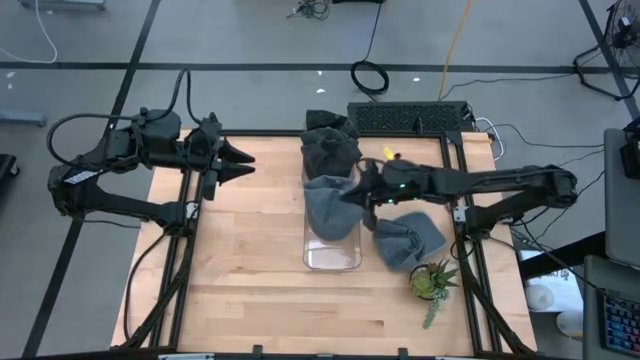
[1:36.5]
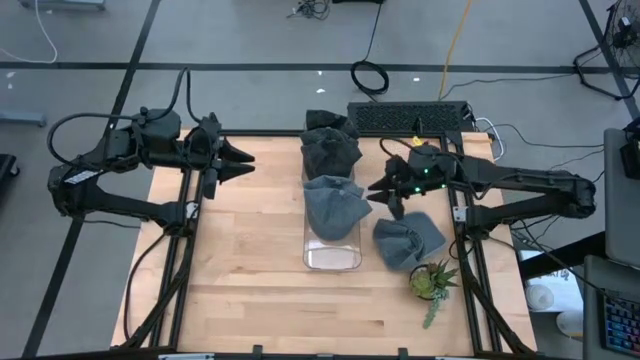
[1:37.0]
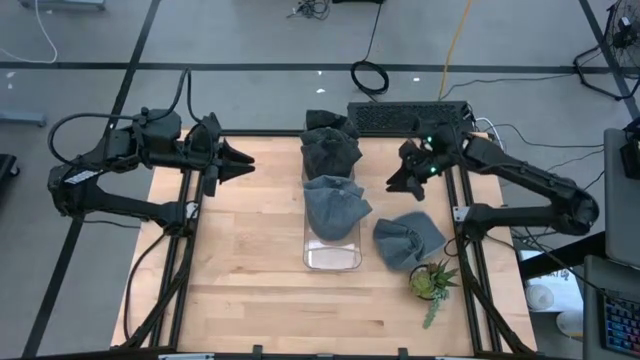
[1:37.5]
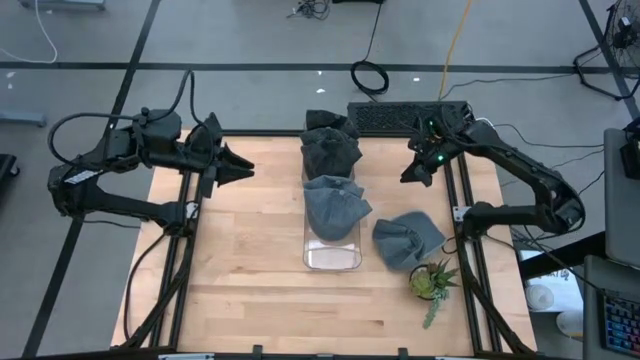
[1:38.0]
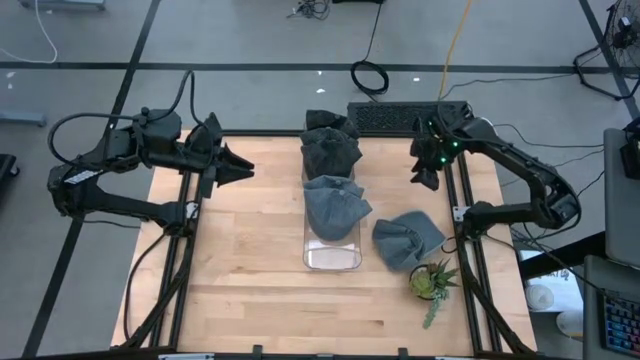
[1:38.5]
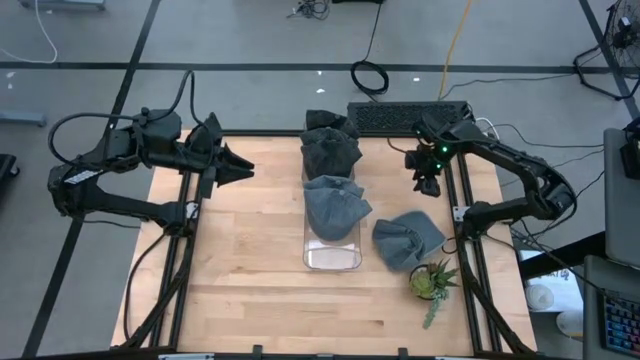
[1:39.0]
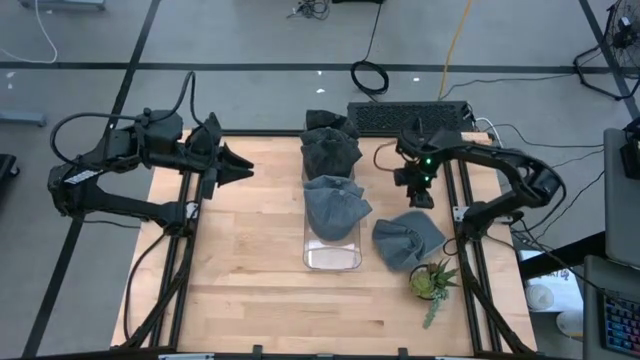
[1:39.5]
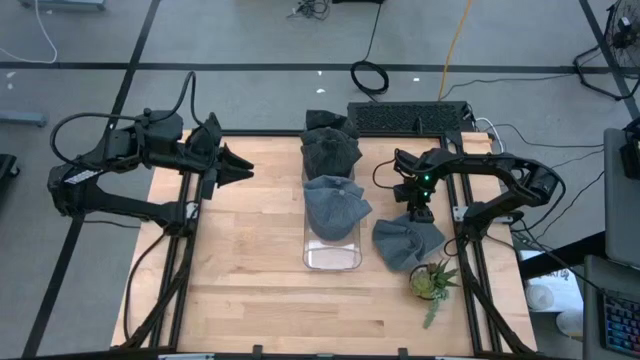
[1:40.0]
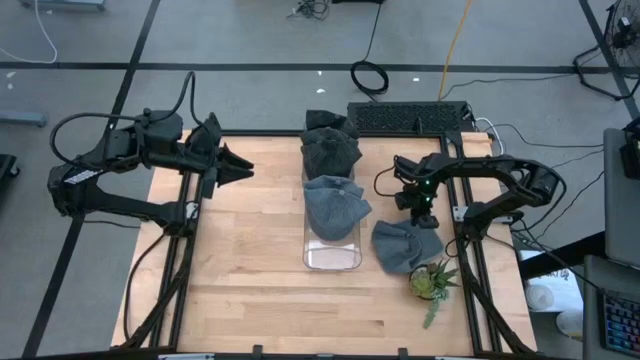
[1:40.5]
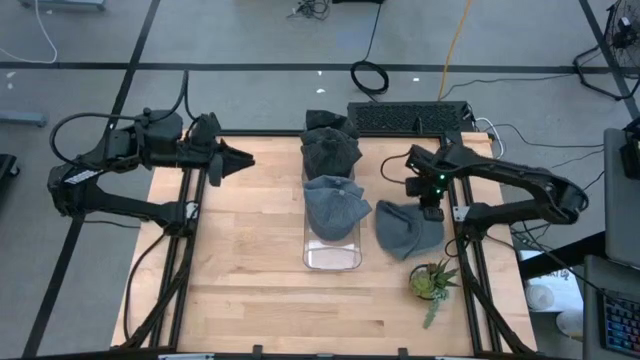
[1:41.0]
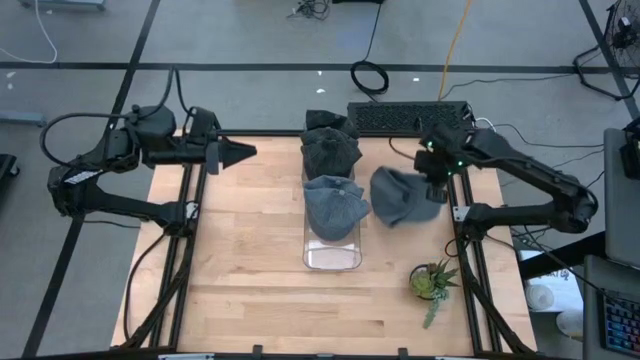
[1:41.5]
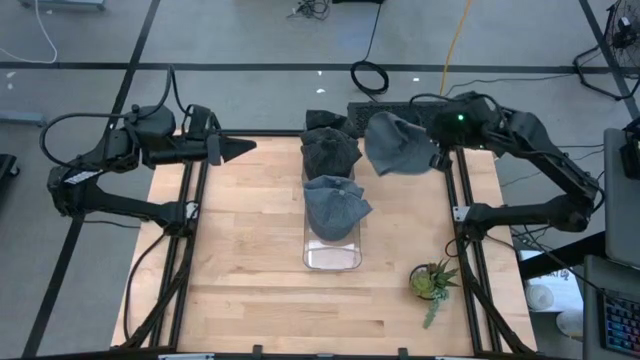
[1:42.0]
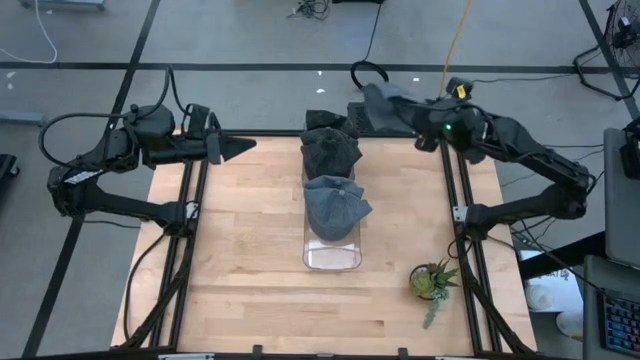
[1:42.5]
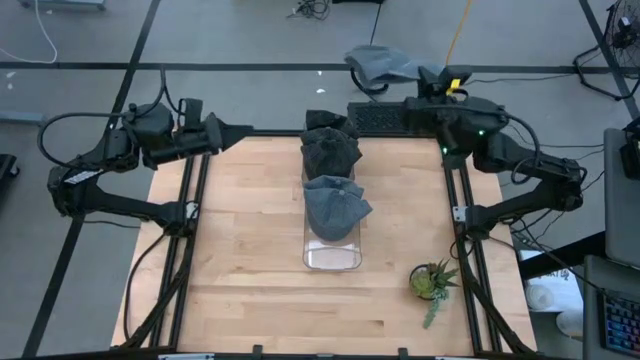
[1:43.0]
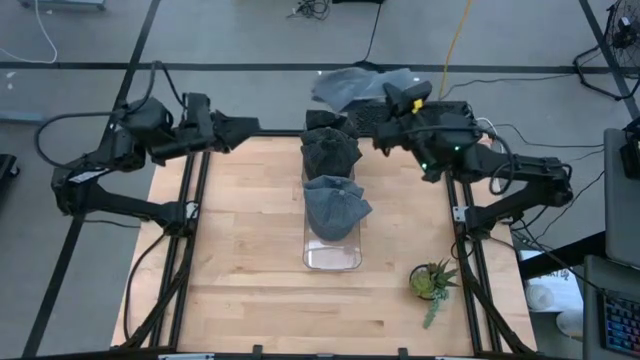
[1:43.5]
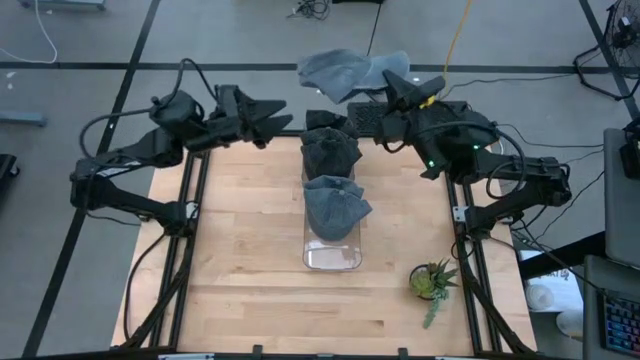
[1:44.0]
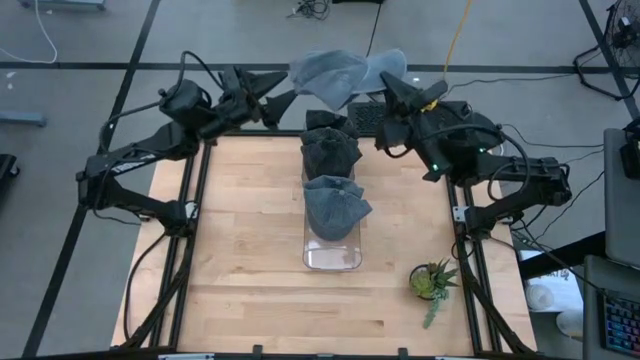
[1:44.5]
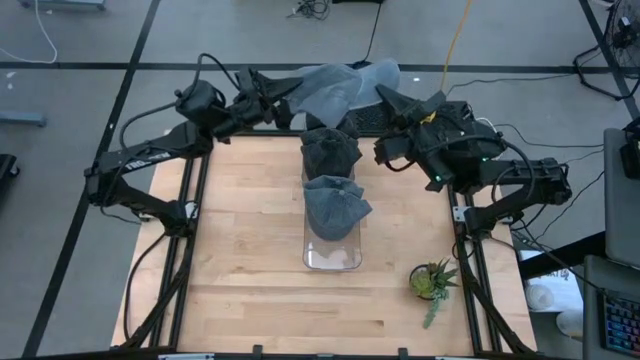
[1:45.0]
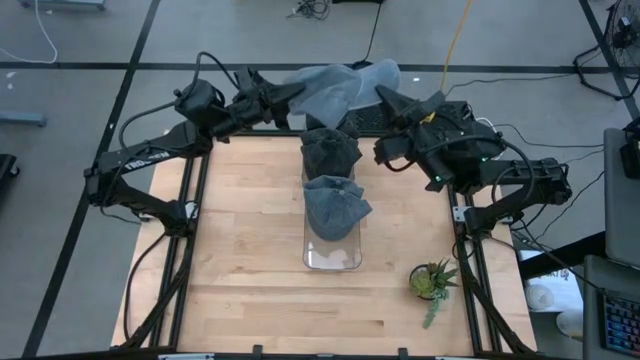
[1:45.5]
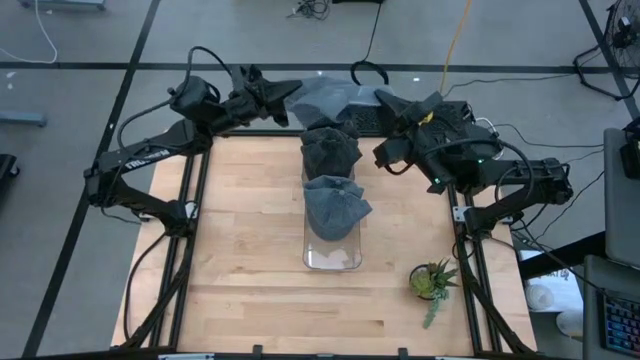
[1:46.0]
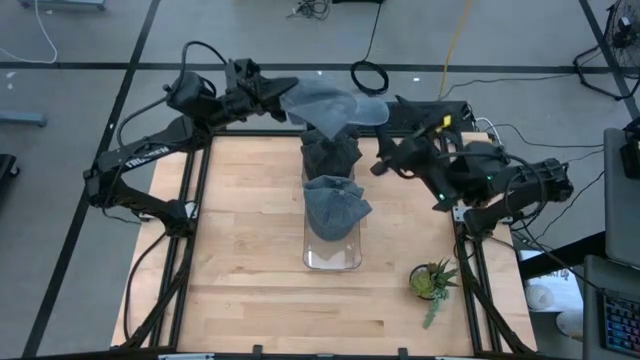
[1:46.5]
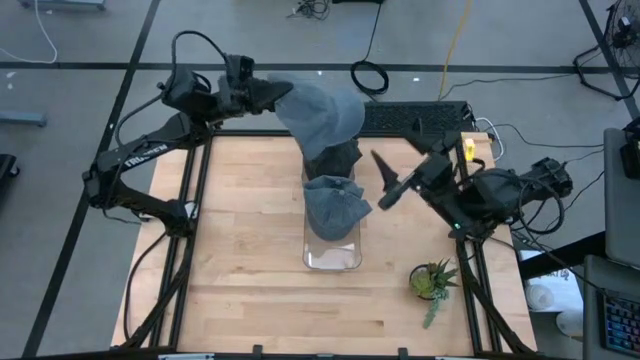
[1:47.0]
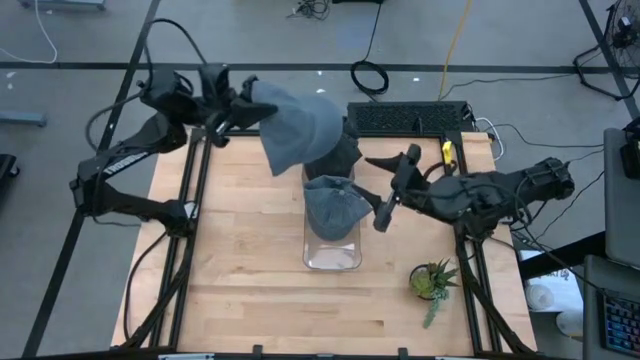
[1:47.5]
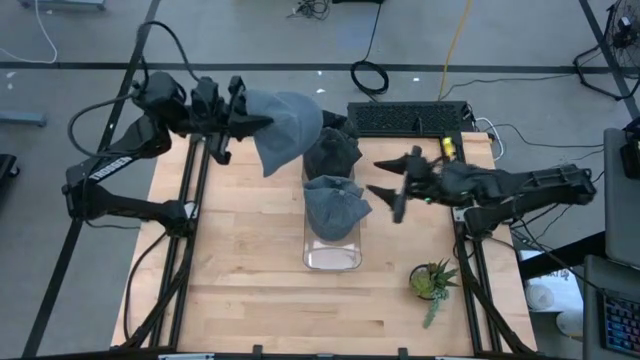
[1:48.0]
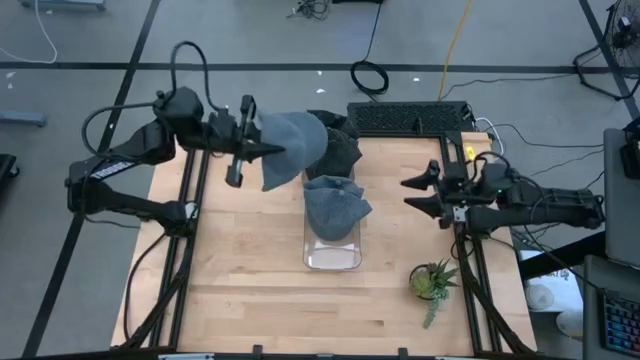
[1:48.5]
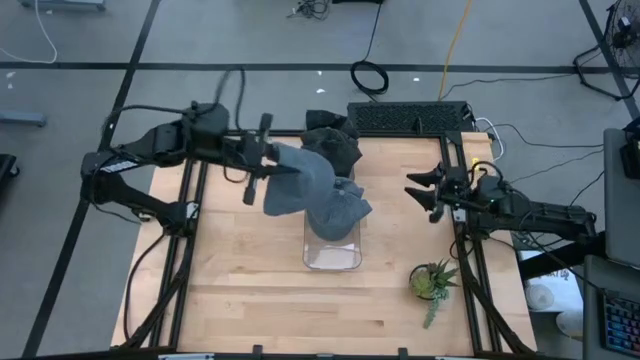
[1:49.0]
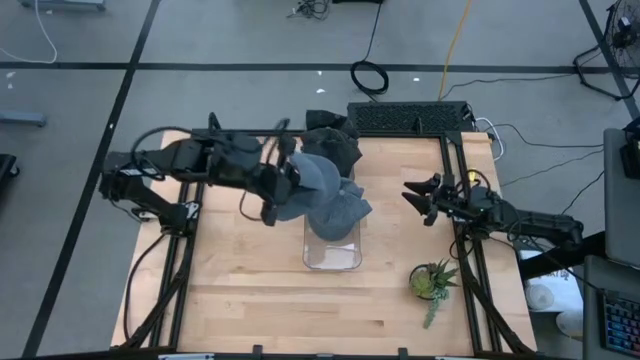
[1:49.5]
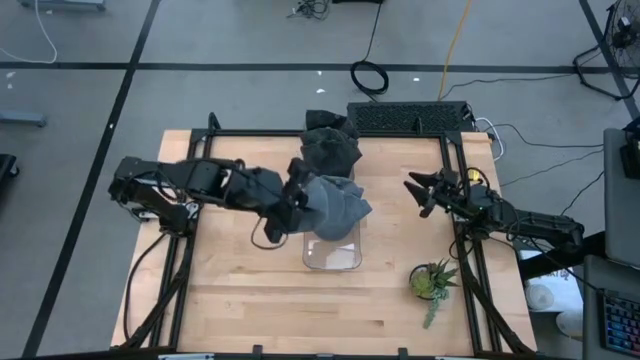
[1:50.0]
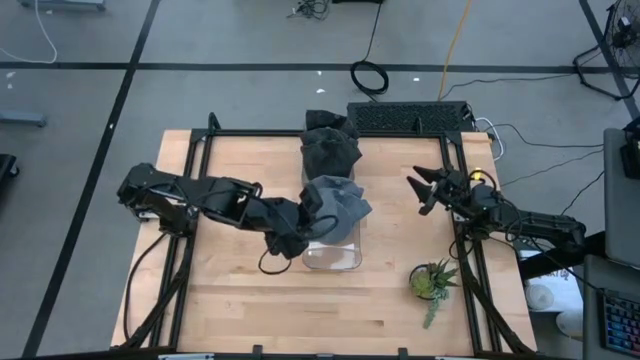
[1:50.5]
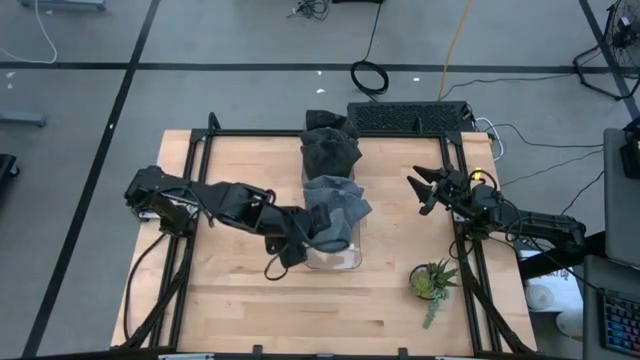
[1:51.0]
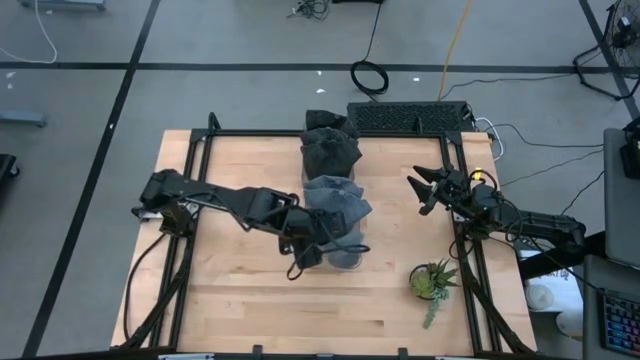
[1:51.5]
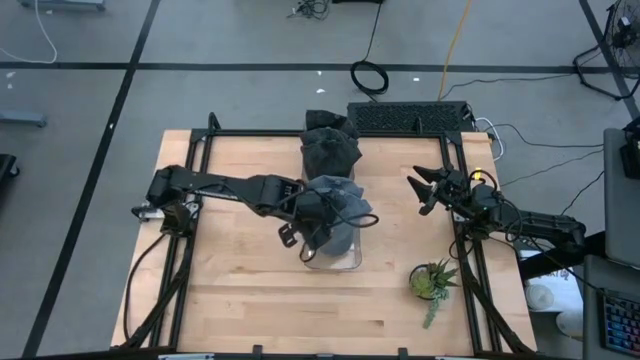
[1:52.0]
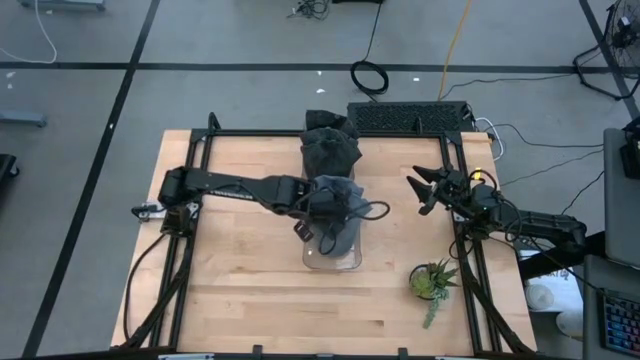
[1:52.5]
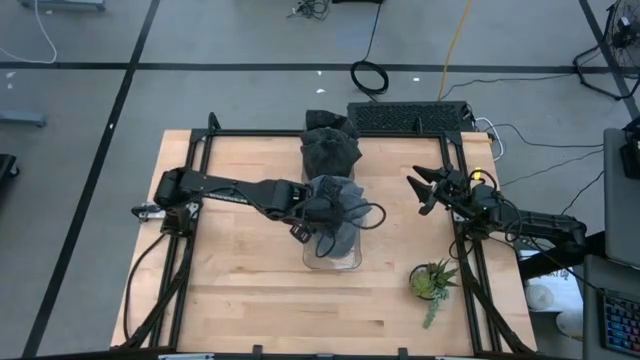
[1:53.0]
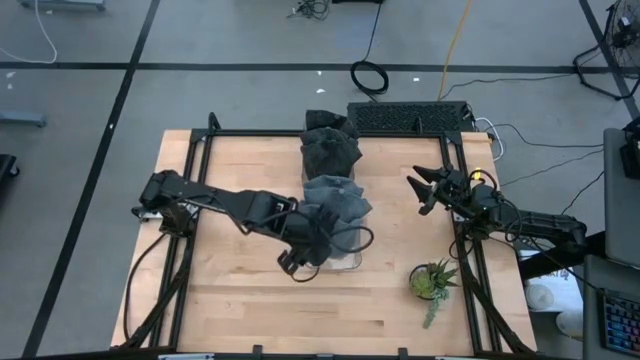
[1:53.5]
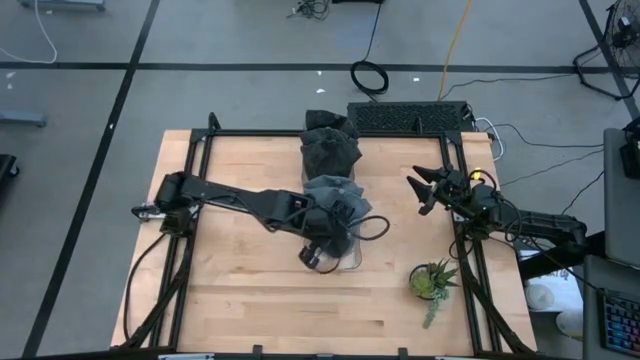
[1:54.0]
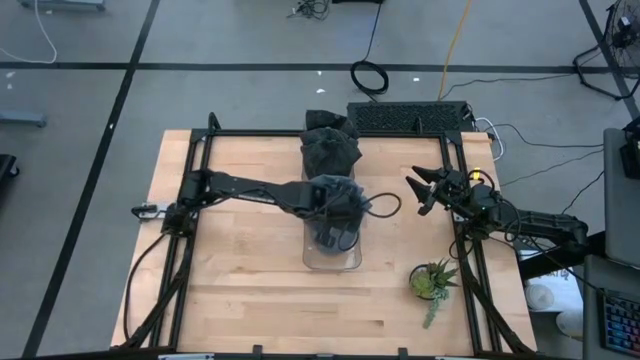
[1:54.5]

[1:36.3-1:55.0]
Task: Pick & Place hat
Put the blue cap into the bottom transparent bin

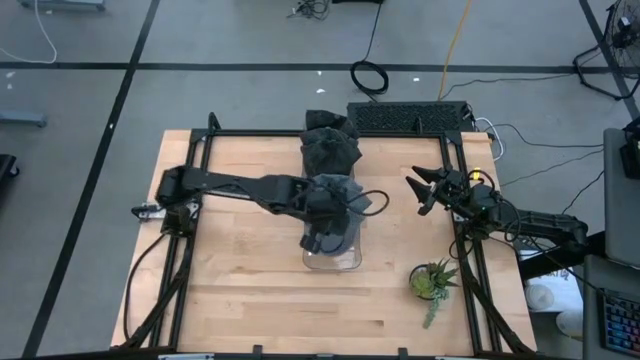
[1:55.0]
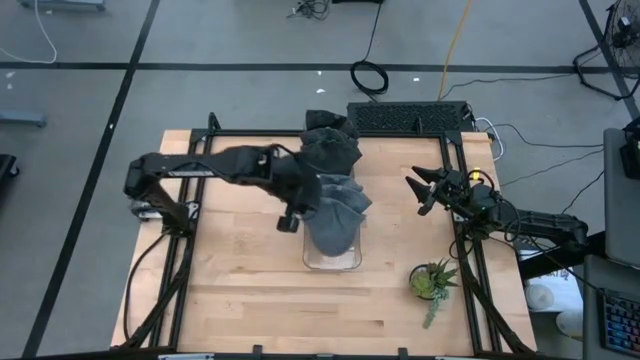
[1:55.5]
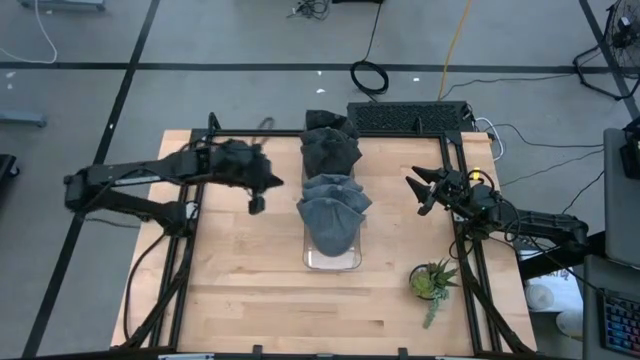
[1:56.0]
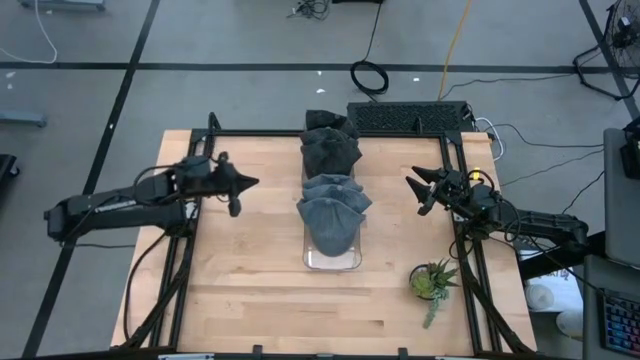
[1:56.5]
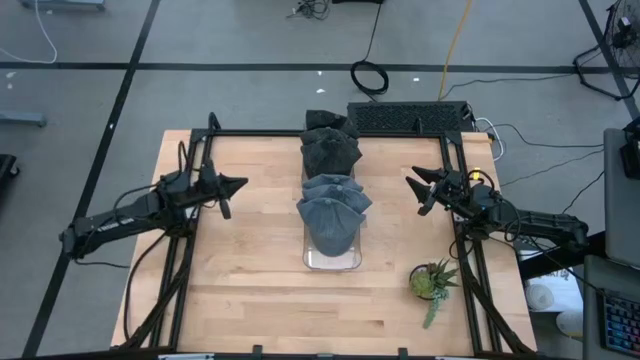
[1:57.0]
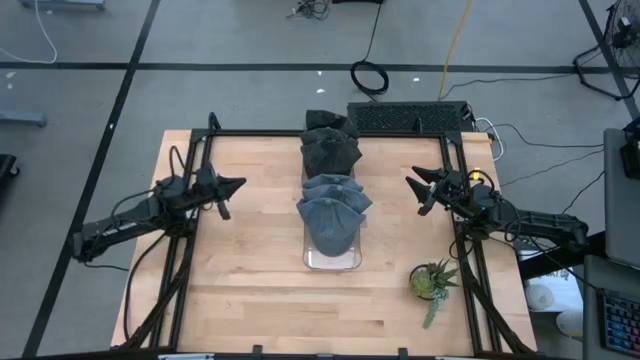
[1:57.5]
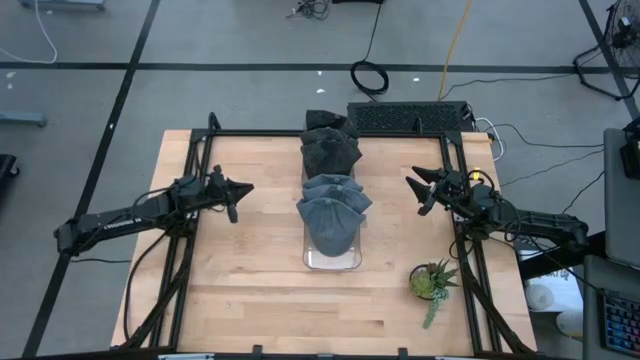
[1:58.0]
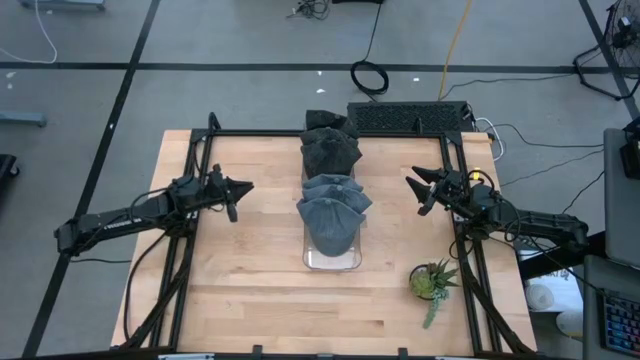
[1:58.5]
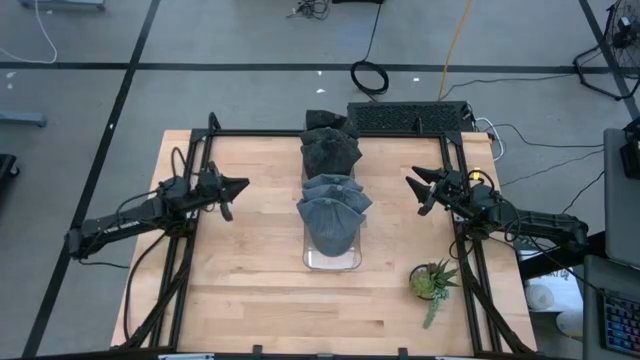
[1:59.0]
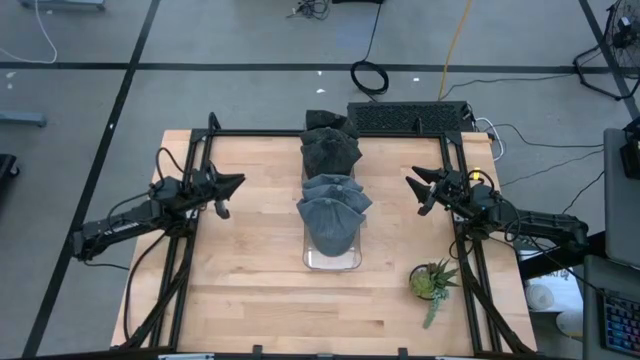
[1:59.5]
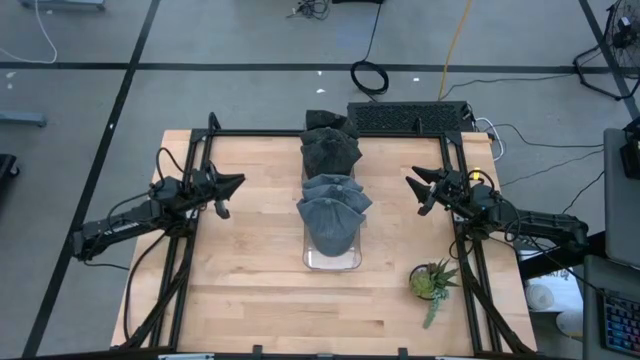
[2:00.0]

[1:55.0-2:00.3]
Return to Home Position
